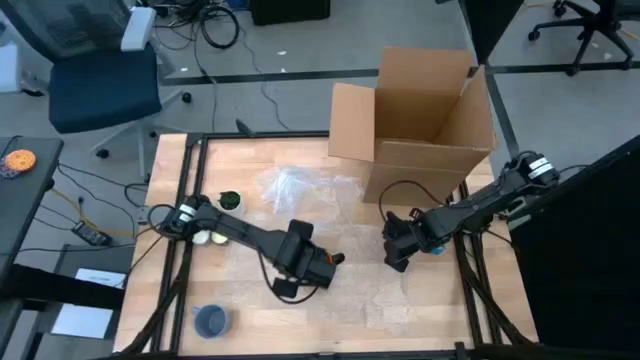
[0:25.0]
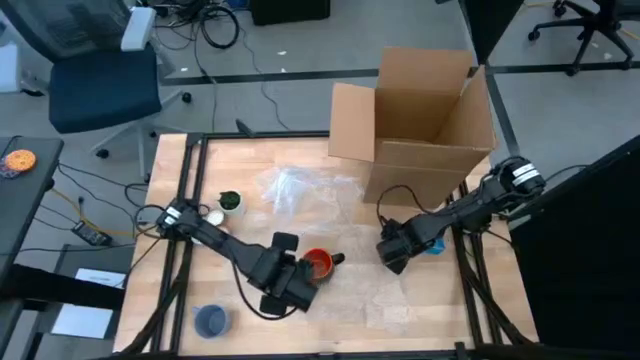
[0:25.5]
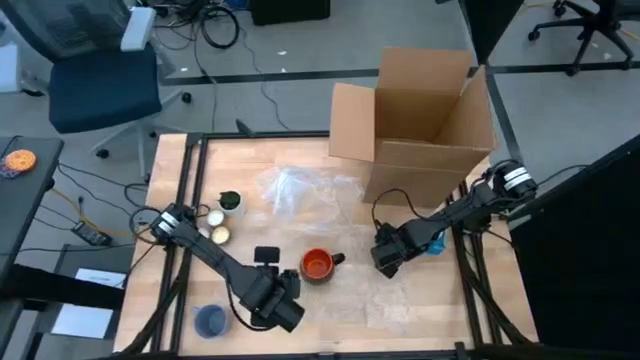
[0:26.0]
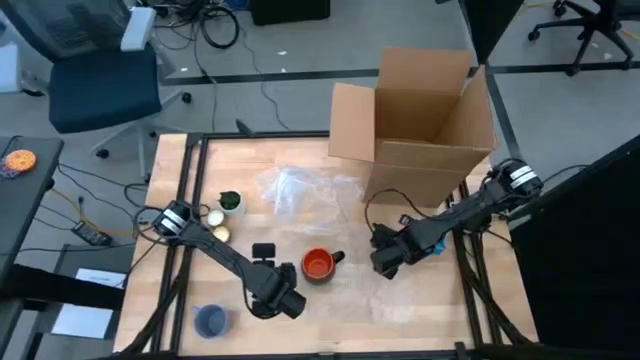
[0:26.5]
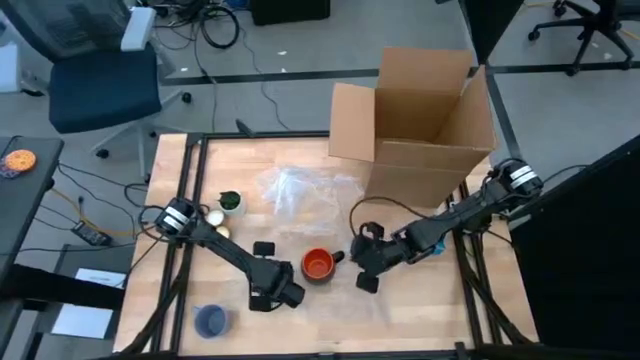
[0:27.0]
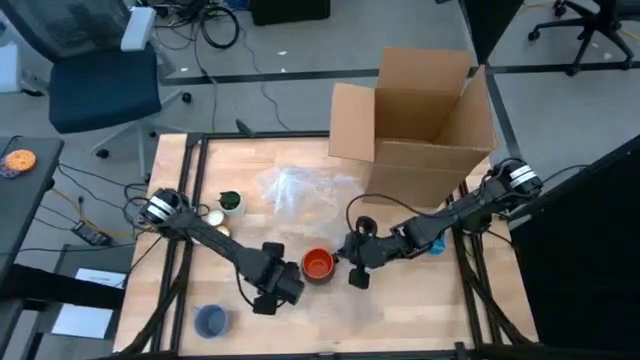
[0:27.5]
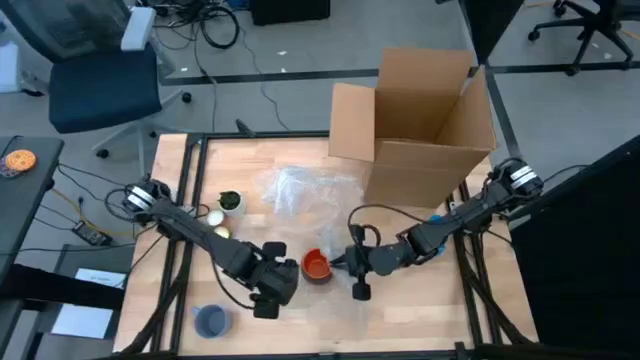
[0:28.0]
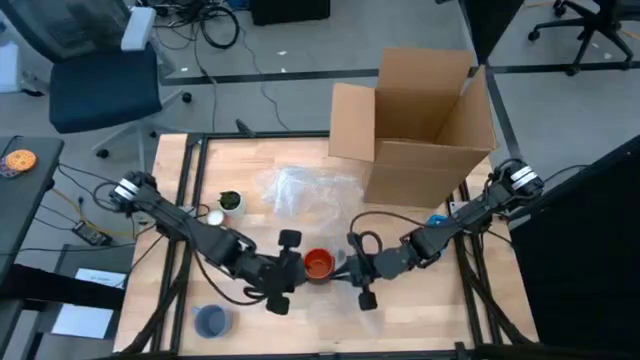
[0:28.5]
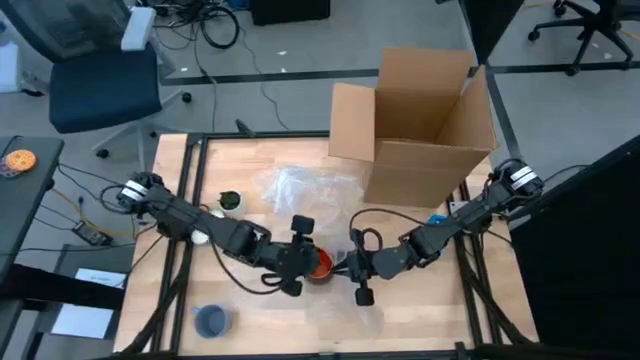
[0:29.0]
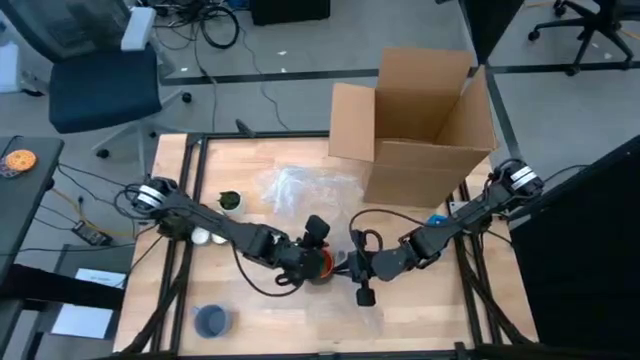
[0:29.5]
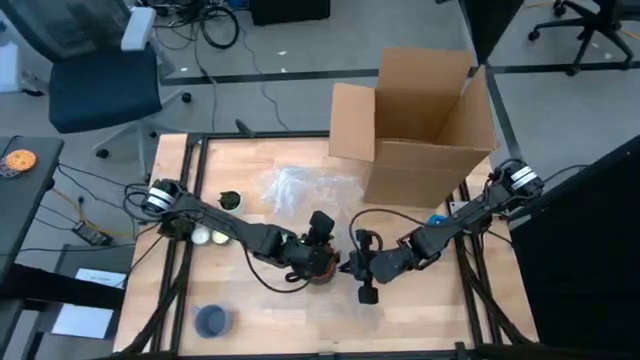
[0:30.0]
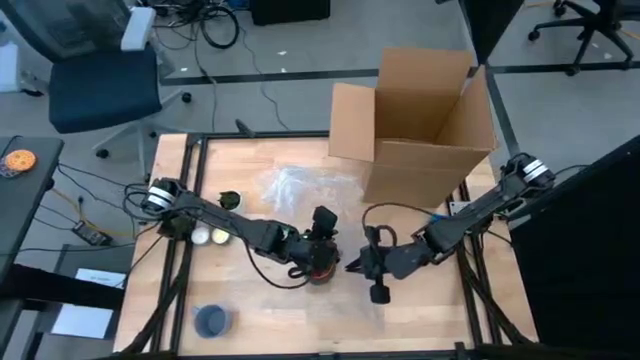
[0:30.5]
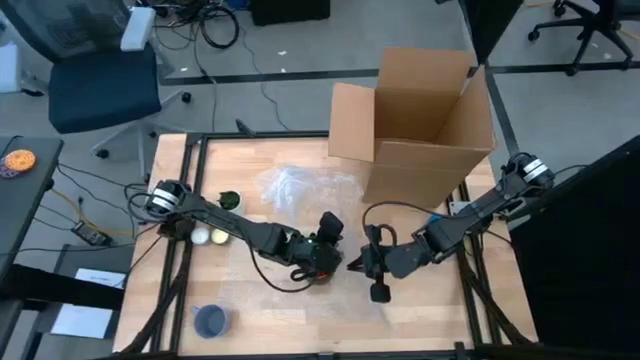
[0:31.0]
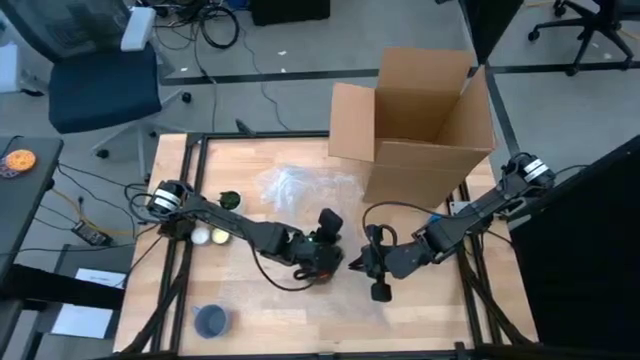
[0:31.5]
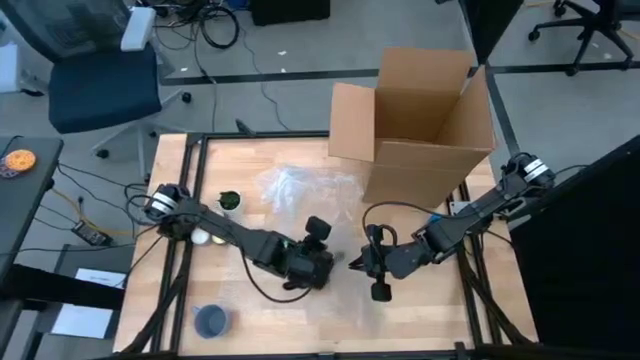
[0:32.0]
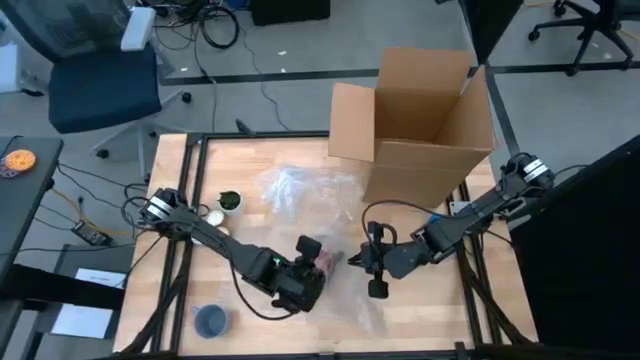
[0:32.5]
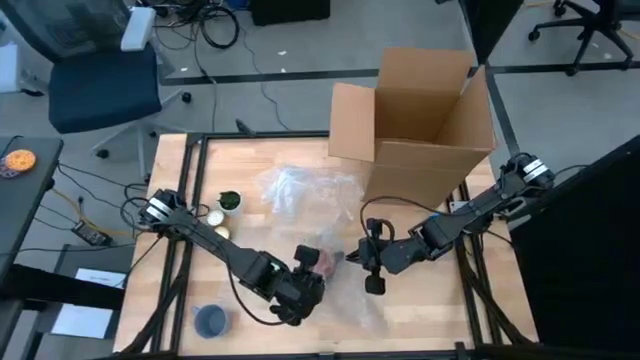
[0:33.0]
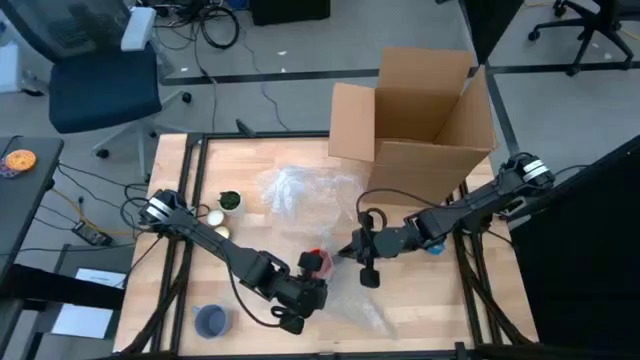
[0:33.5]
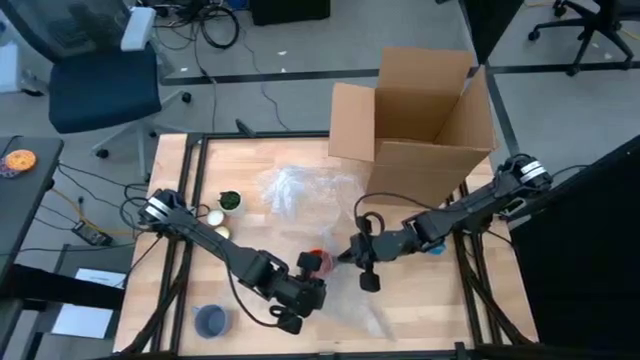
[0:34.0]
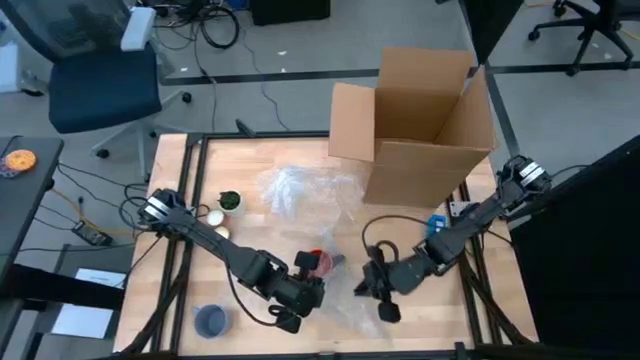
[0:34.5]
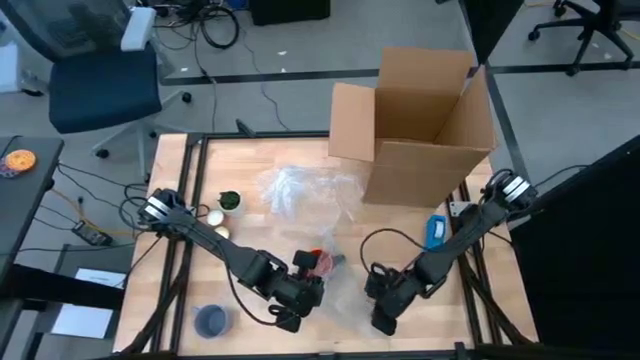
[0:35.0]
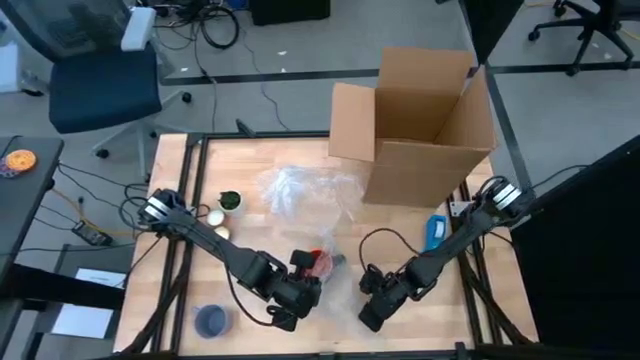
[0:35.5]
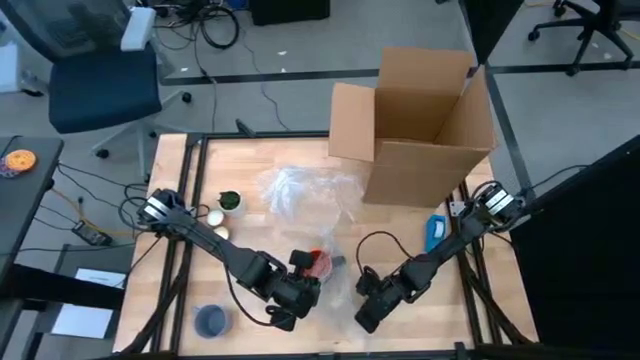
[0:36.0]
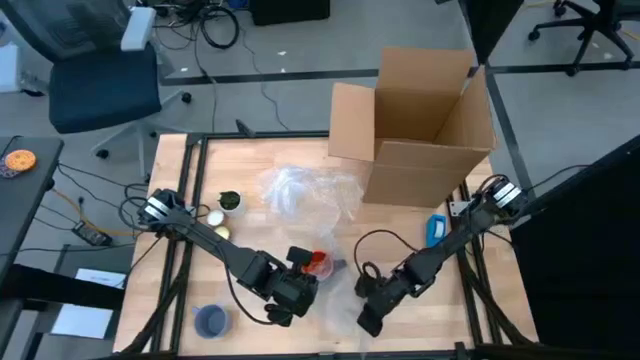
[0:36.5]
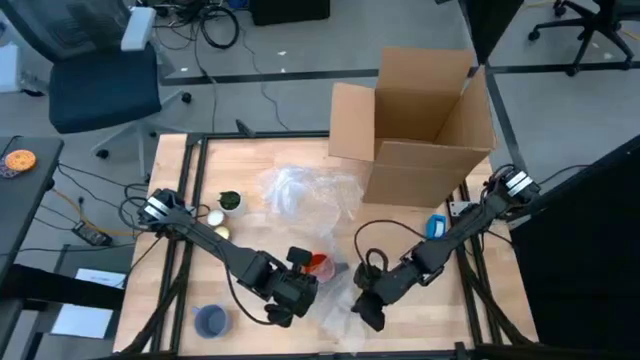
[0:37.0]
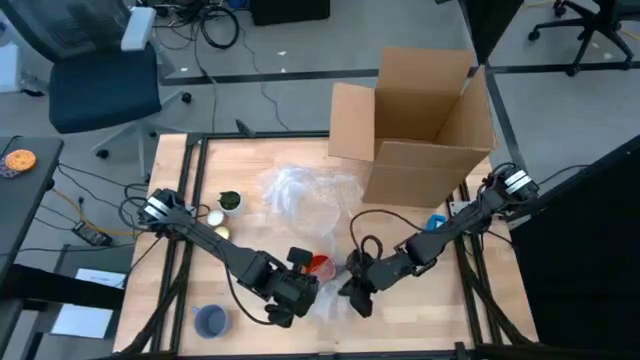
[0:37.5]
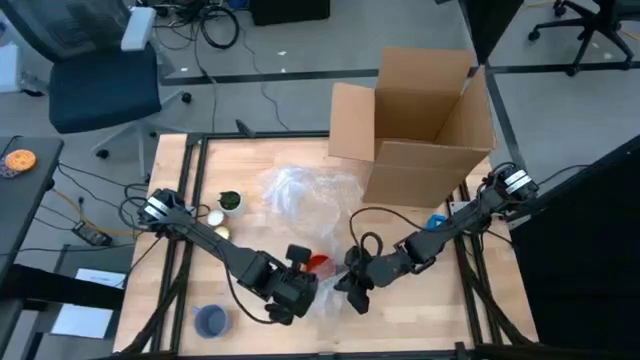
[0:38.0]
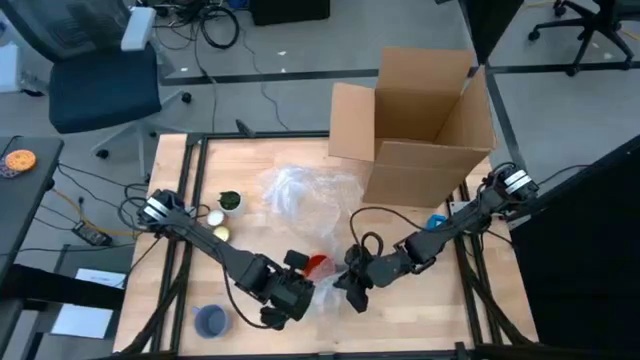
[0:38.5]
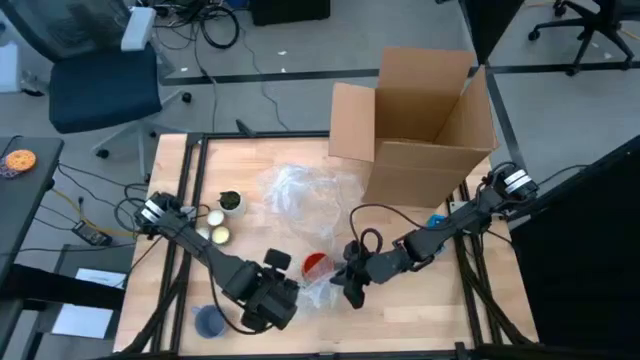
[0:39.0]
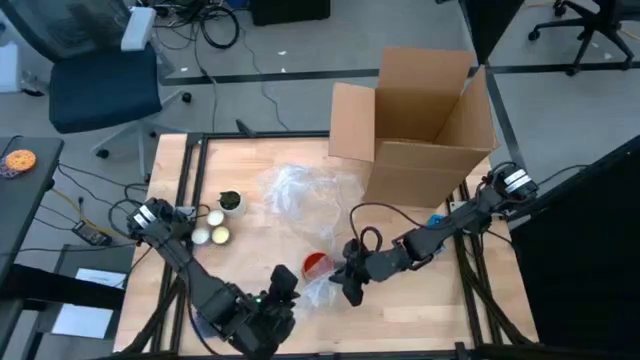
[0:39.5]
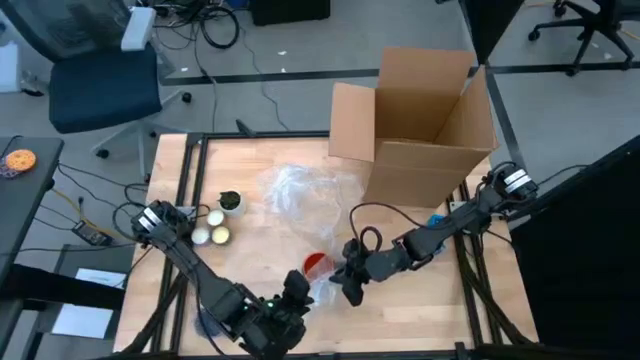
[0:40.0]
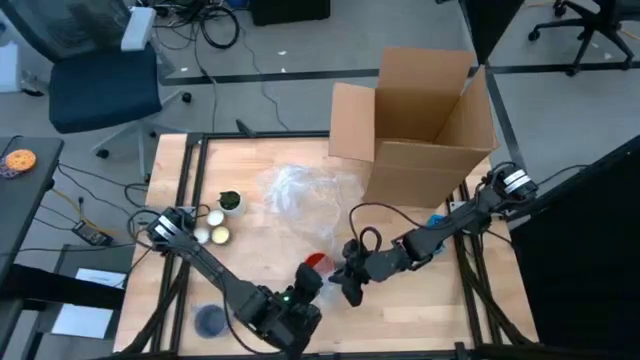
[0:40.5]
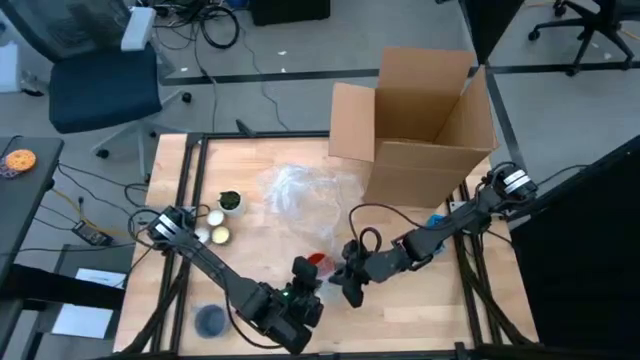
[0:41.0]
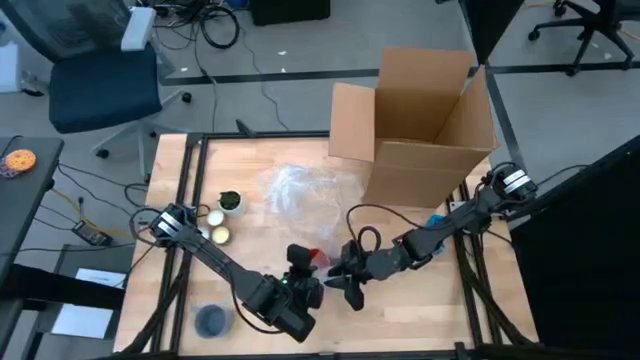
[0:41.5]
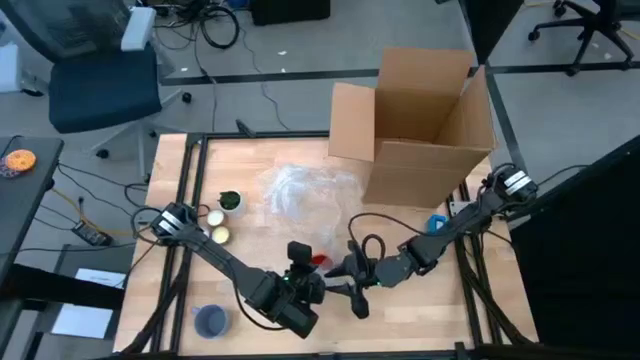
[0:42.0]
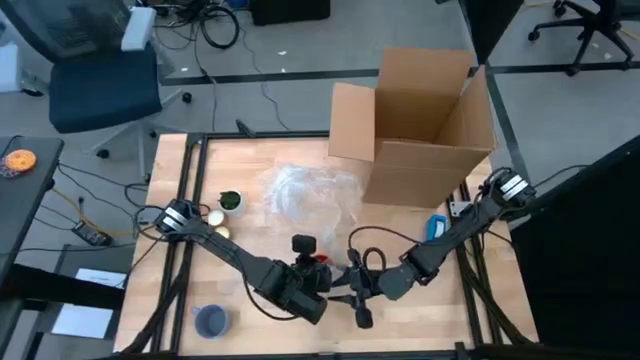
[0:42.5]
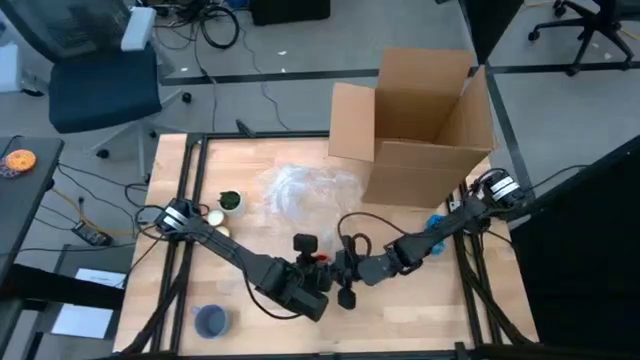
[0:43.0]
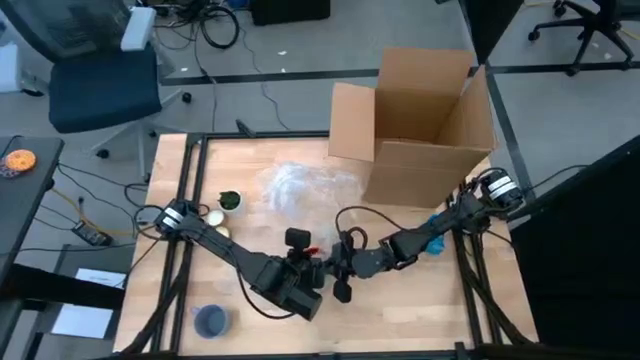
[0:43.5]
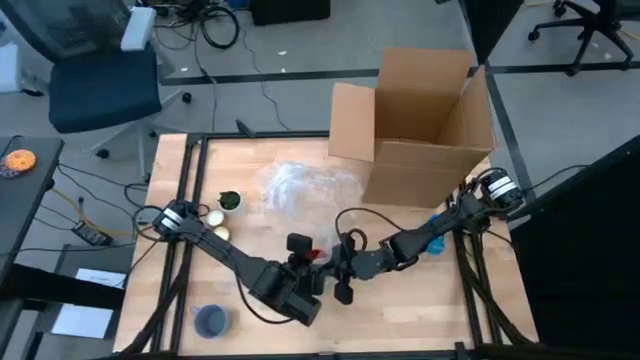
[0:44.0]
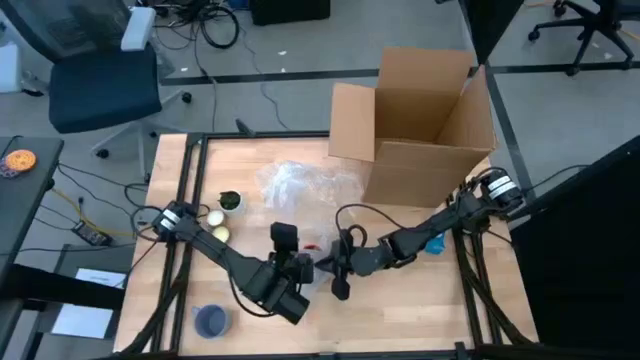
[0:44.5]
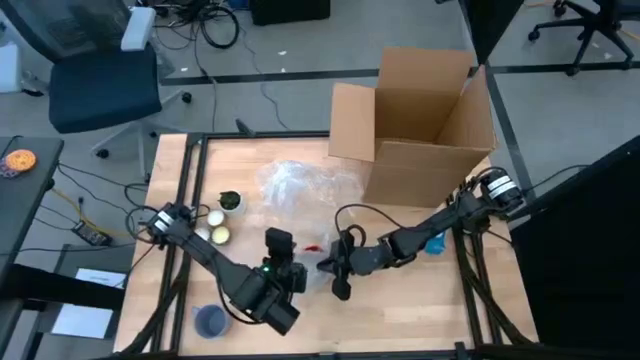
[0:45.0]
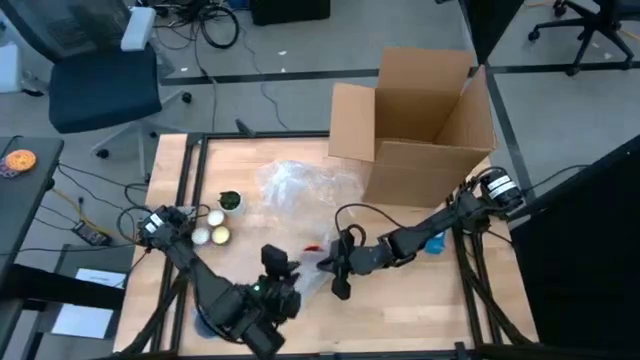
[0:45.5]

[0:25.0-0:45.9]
Task: wrap mug
Wrap the black mug with bubble wrap
